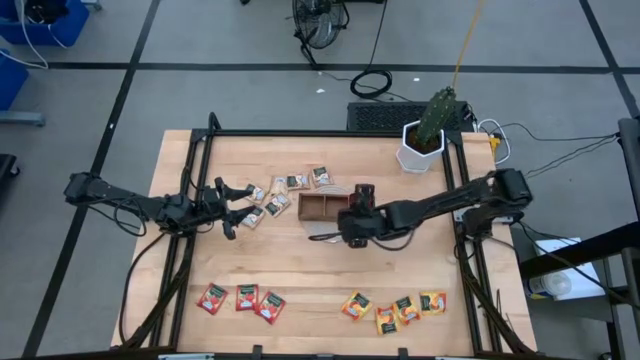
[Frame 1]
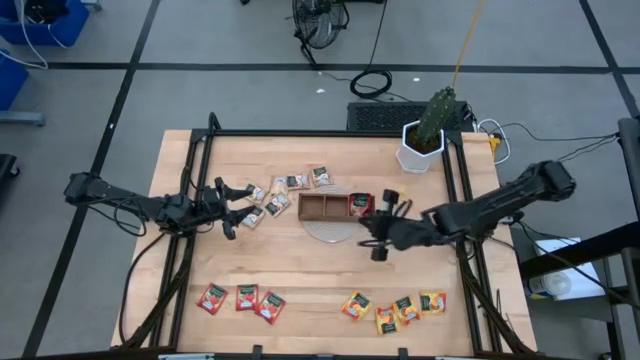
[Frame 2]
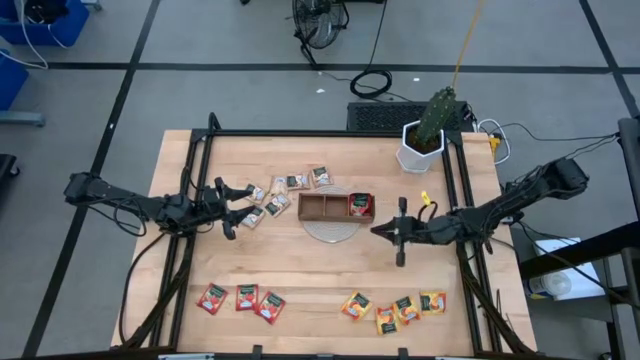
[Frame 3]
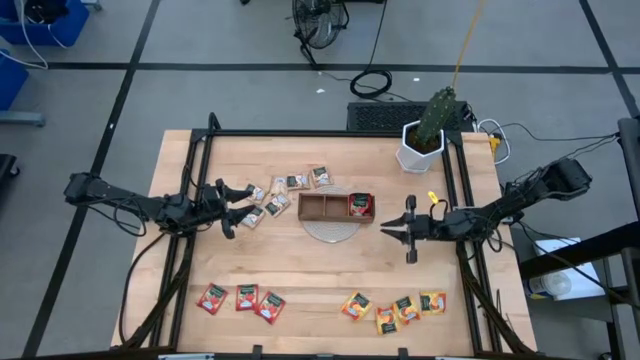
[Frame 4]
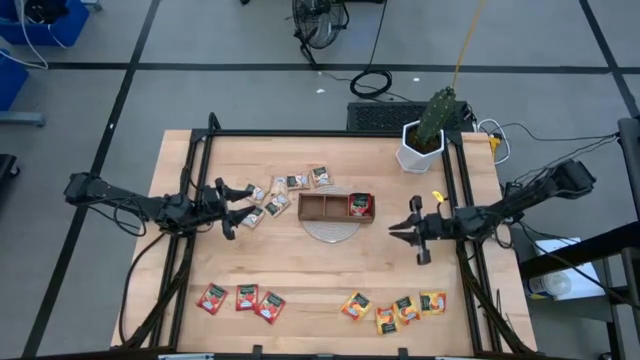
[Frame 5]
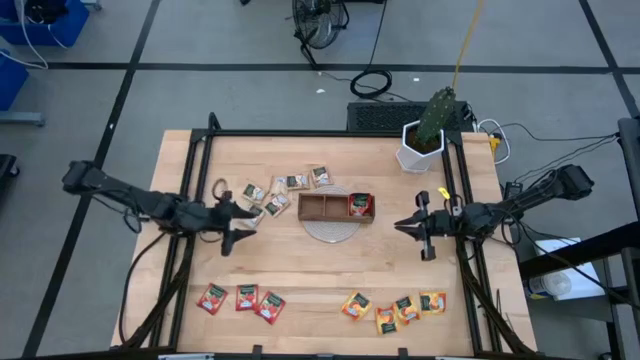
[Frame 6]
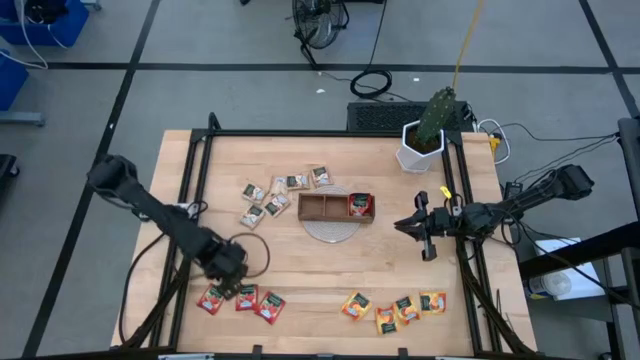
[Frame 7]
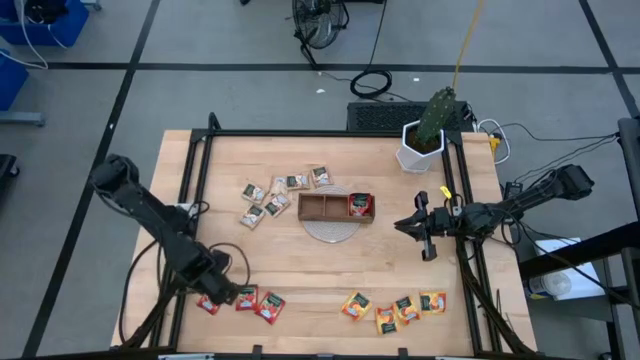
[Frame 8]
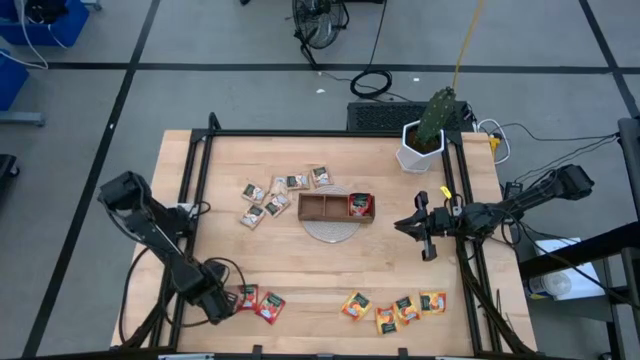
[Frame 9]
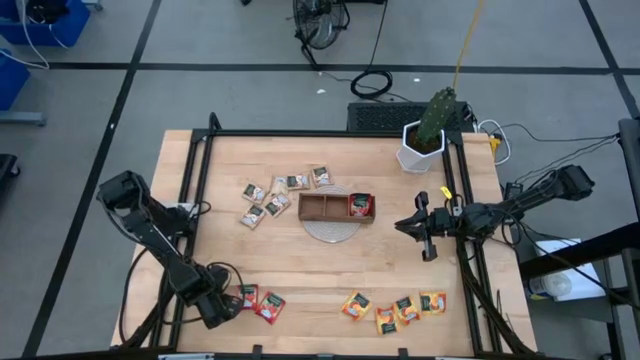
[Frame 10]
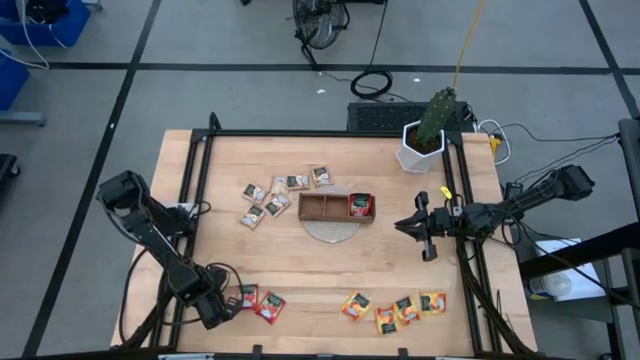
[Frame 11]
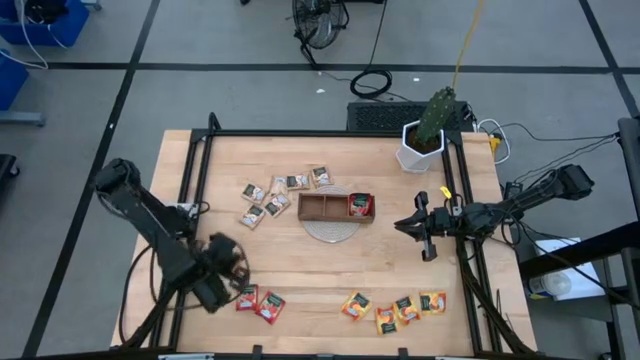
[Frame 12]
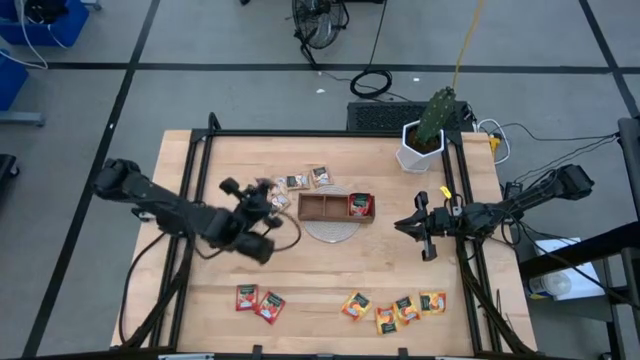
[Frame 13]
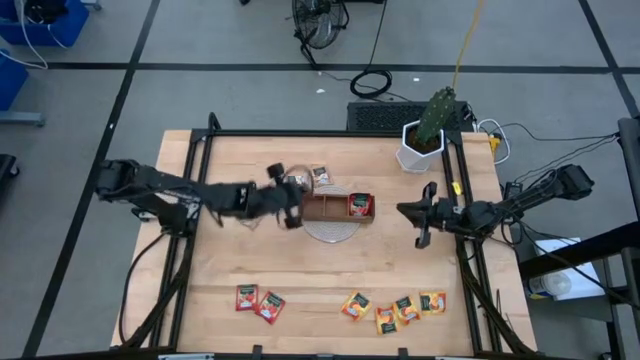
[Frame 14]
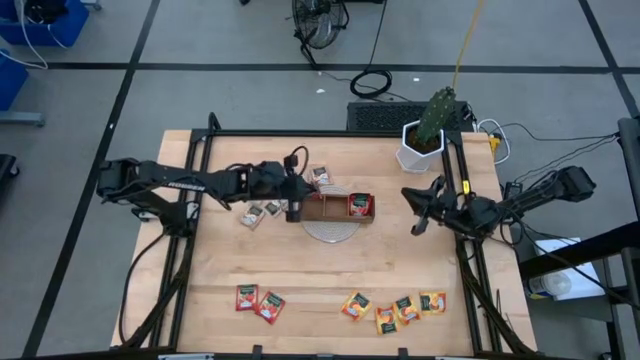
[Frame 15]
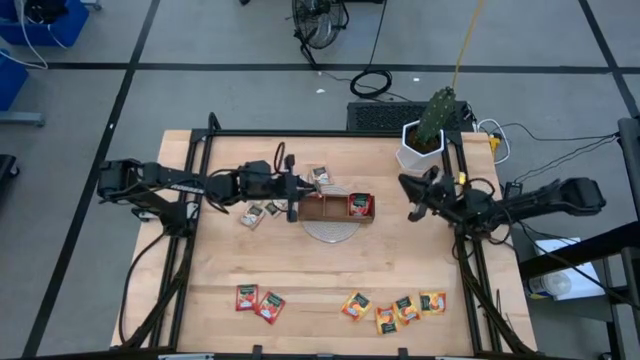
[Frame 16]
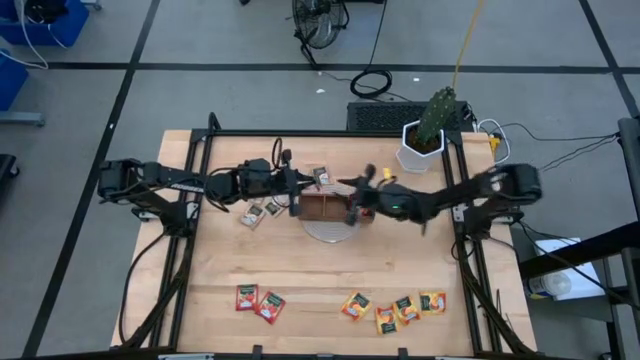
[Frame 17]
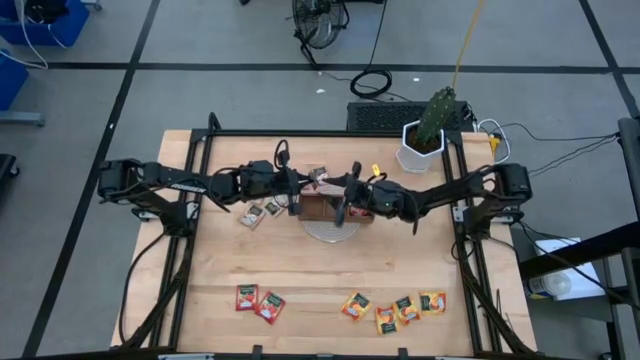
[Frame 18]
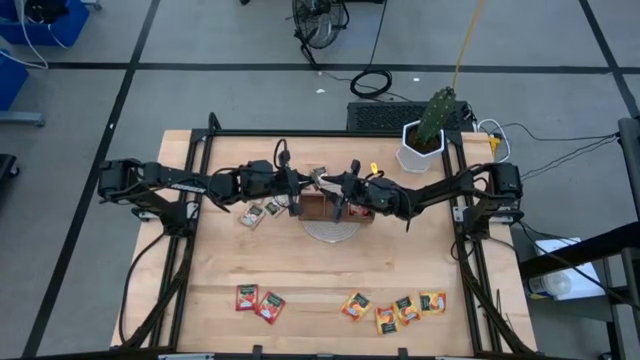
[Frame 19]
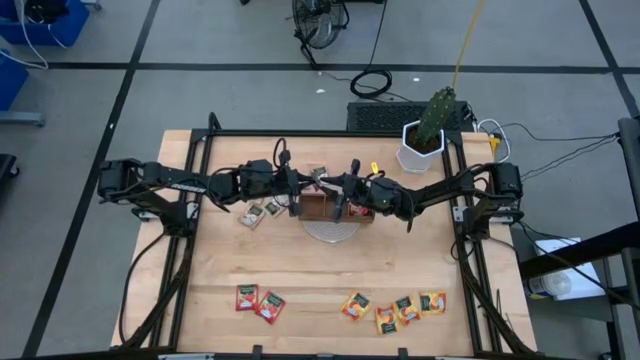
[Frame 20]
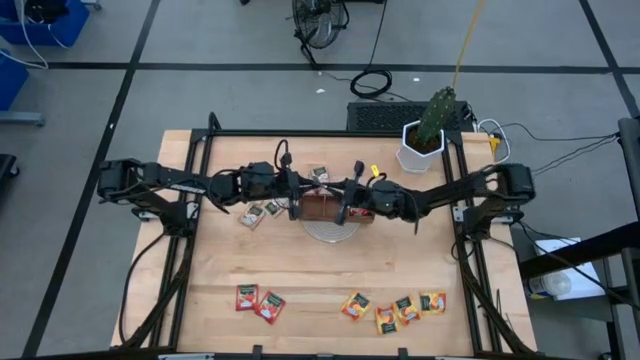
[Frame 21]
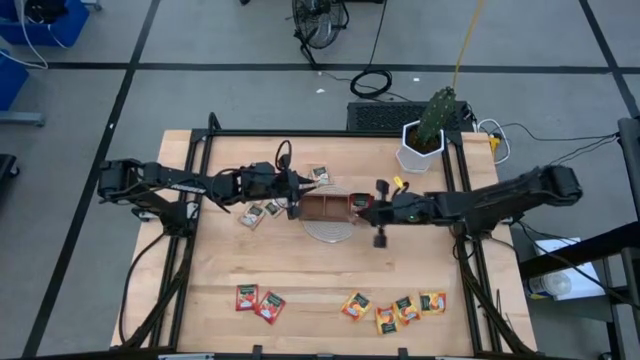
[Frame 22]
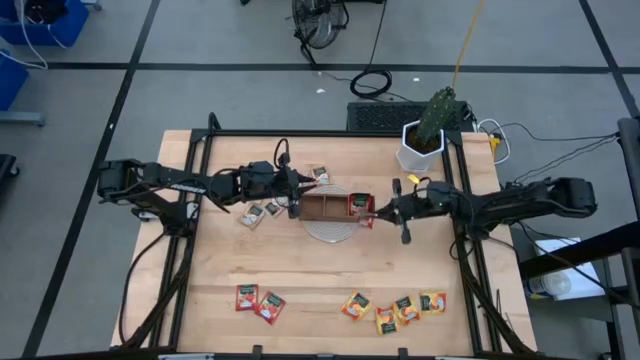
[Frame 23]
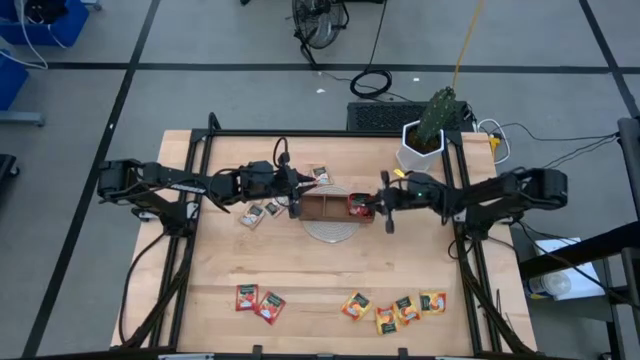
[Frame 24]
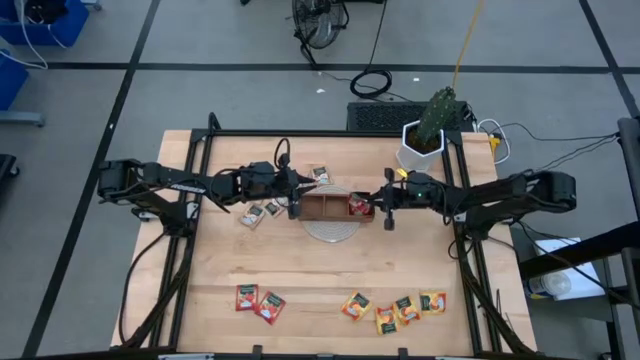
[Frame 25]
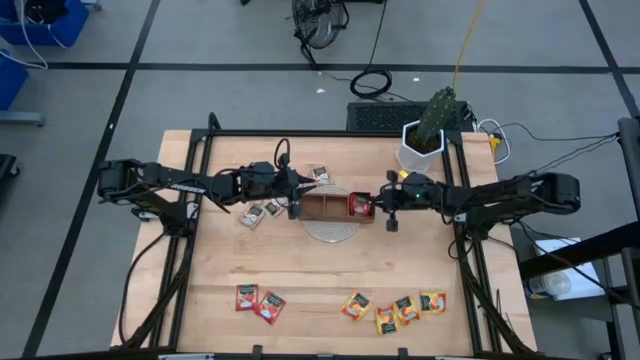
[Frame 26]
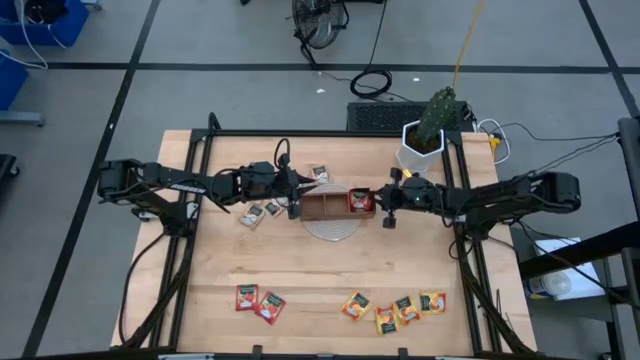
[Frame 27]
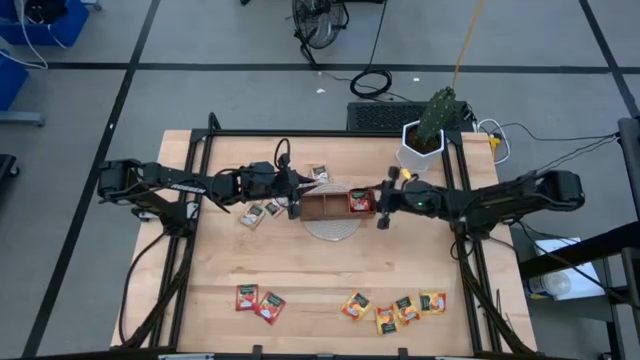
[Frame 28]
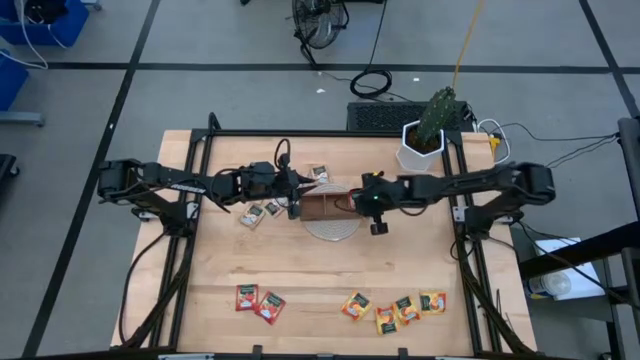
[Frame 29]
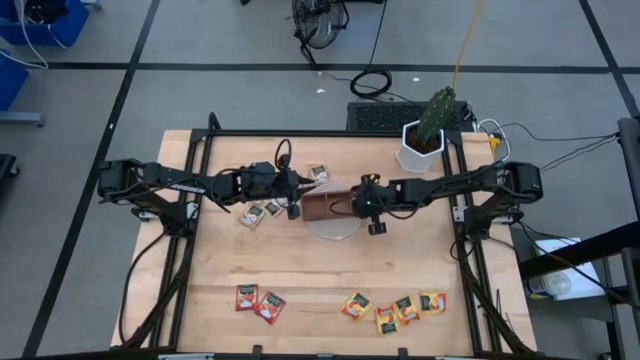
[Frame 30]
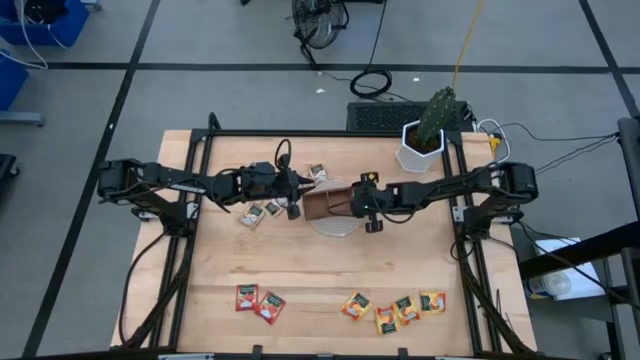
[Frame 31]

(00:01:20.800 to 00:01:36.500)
Task: Pick & Place Tea
Put the red tea bag into the right section of the wood organizer

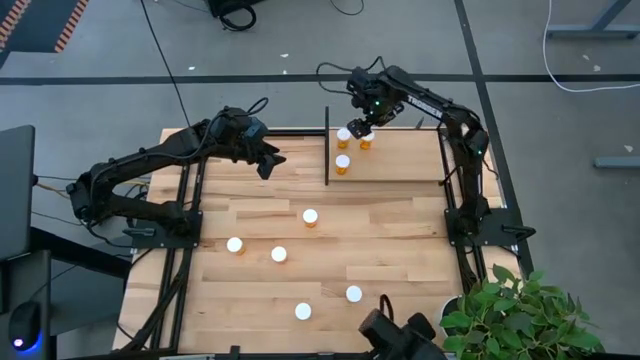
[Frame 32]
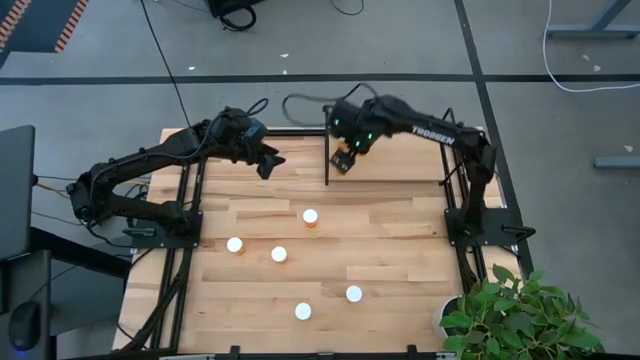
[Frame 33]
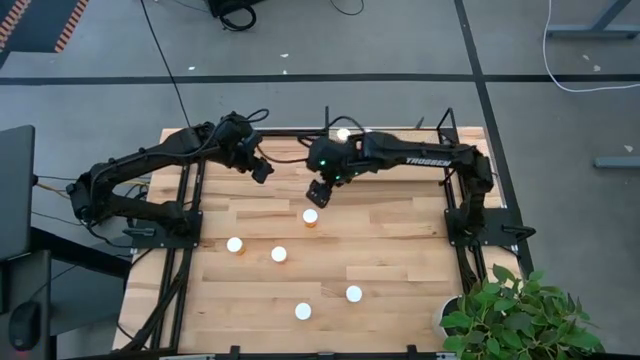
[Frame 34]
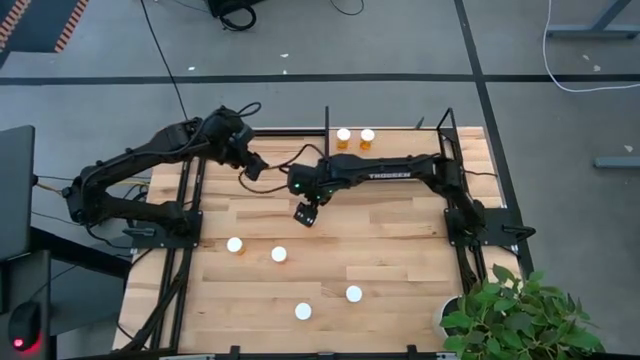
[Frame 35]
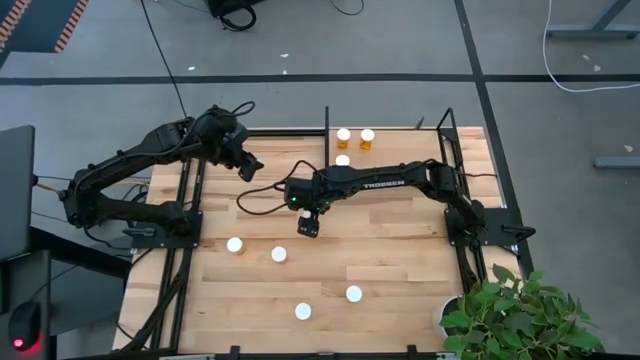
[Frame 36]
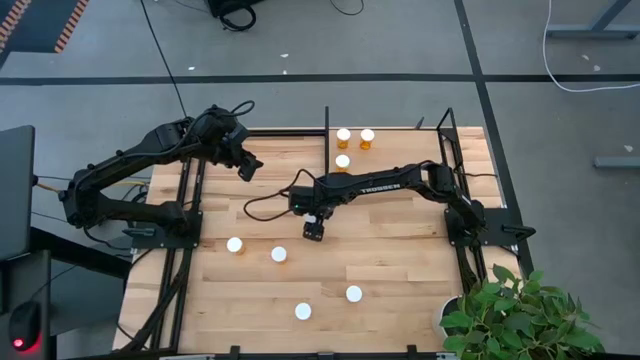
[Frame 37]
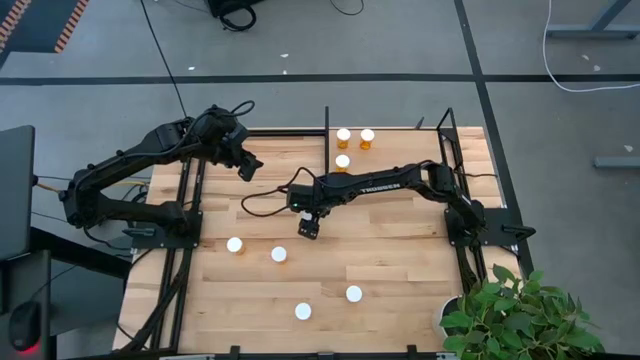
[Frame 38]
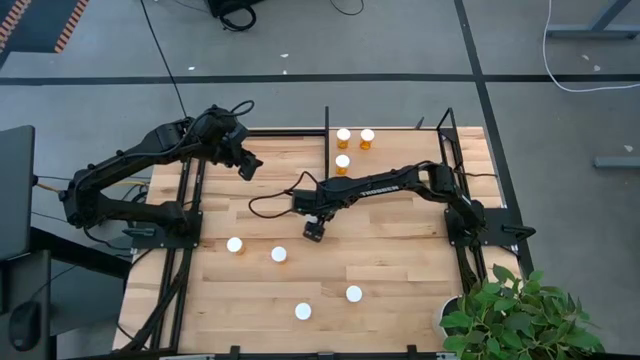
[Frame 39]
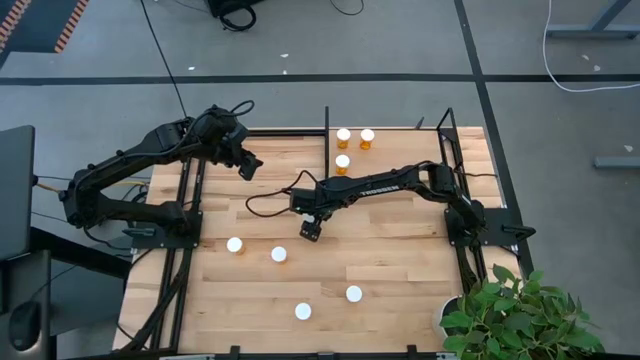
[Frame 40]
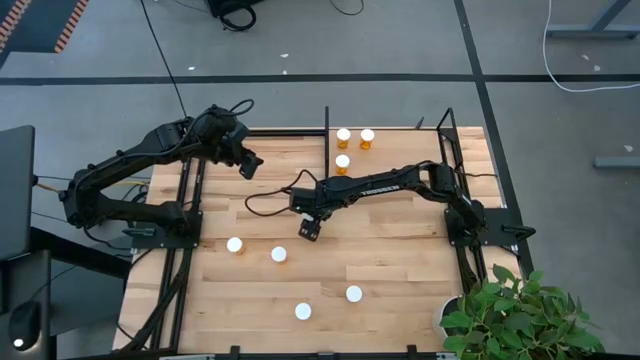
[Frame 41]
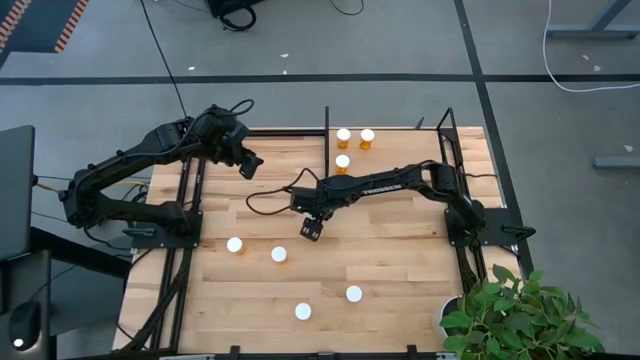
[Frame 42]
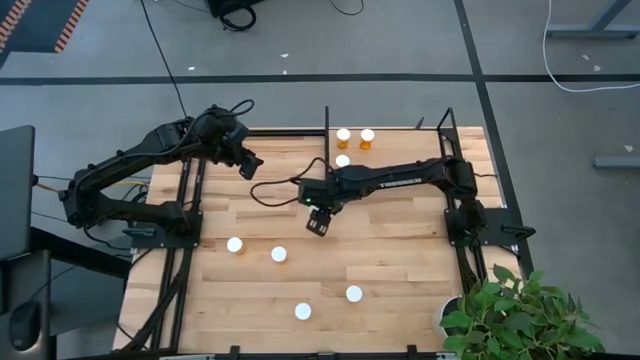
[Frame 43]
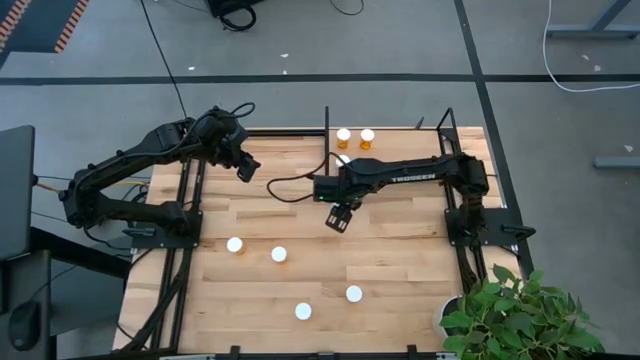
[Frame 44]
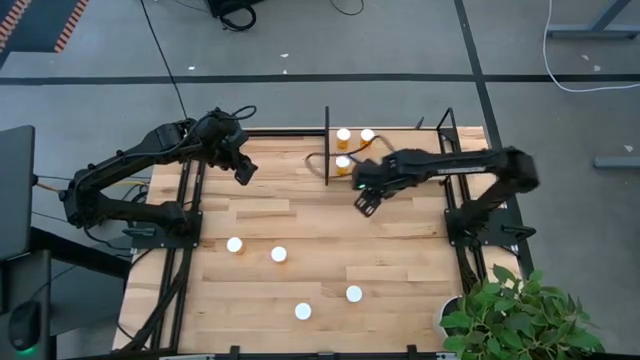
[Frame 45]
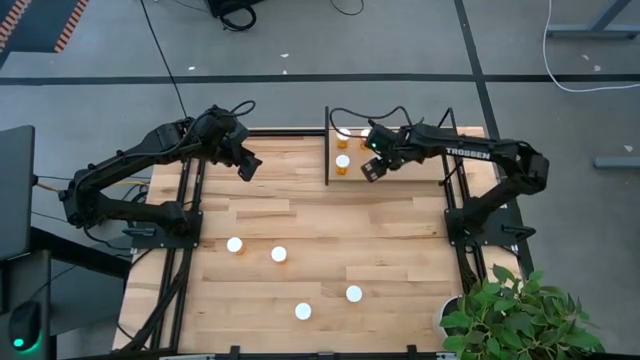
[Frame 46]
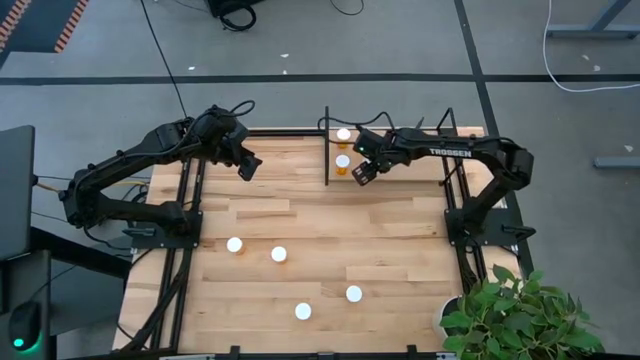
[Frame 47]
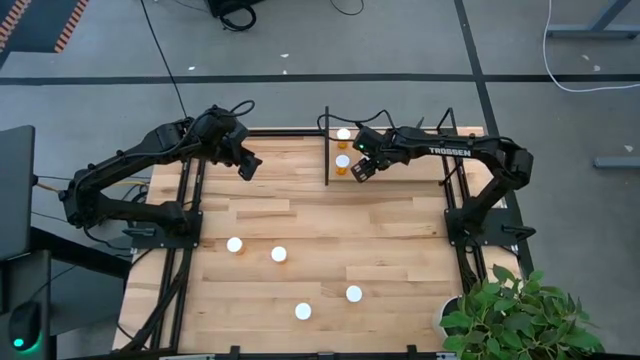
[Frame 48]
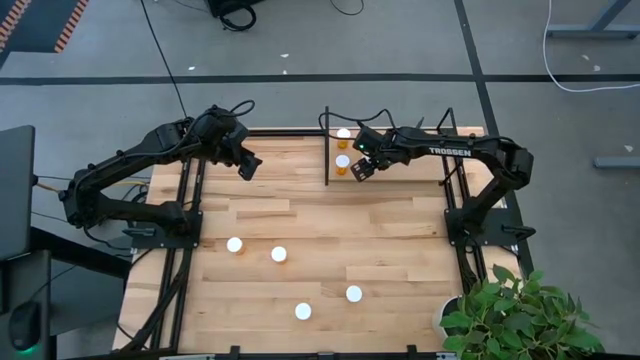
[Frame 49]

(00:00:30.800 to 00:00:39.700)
Task: Pick and place medicine bottles onto shelf by color
Put the orange pill bottle on the shelf
